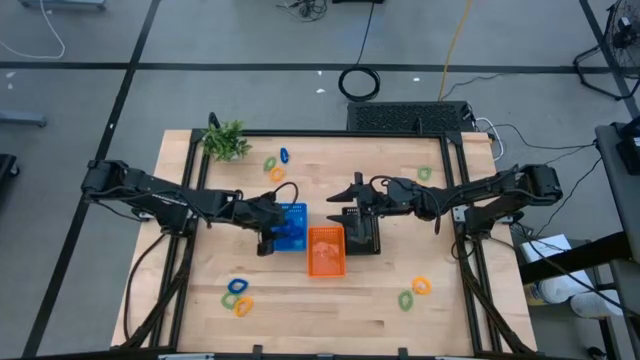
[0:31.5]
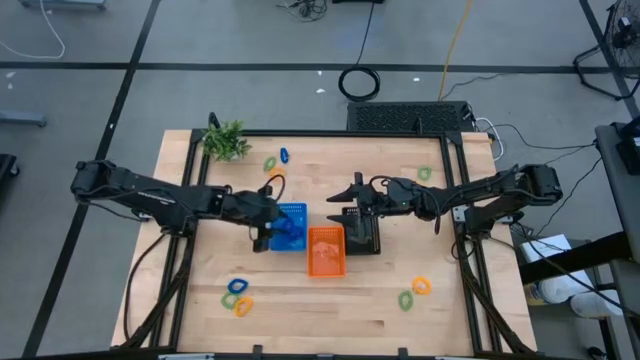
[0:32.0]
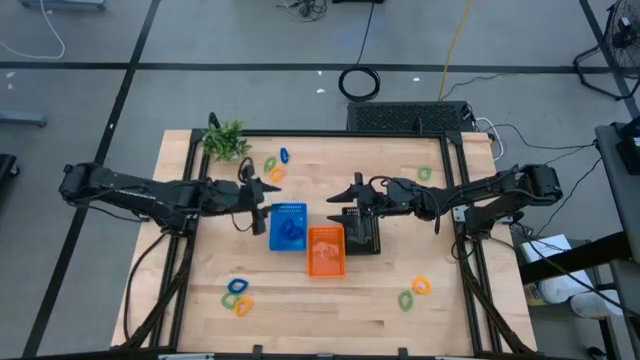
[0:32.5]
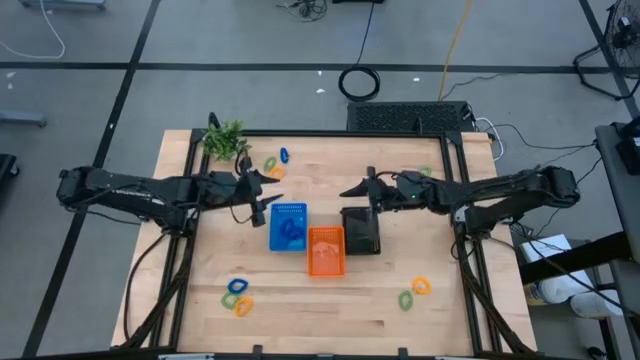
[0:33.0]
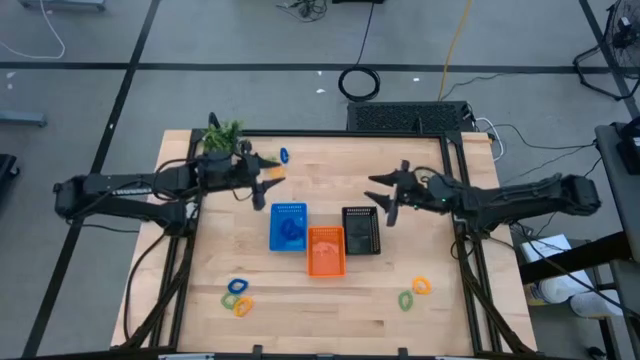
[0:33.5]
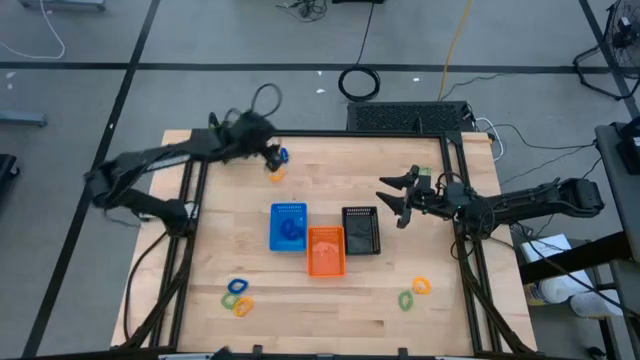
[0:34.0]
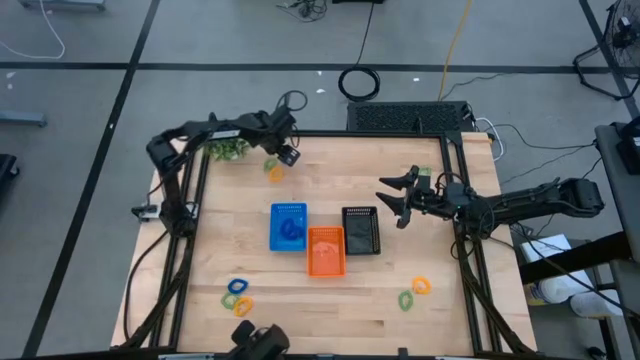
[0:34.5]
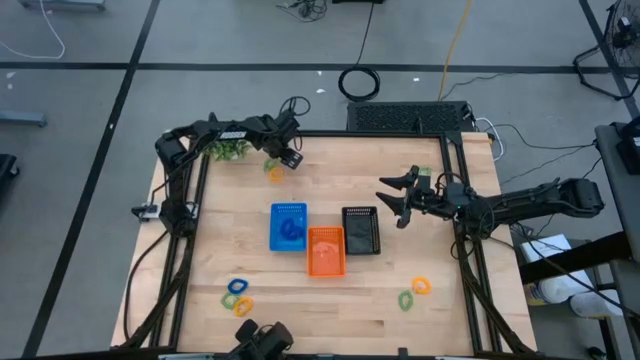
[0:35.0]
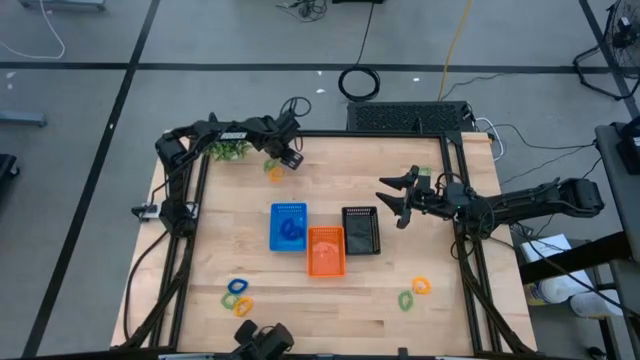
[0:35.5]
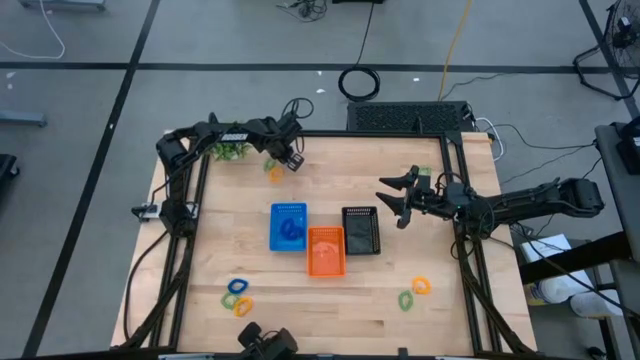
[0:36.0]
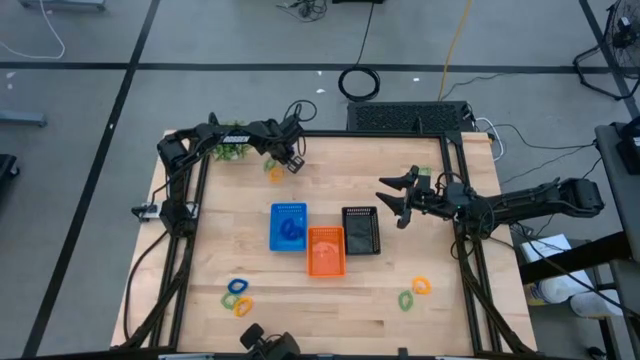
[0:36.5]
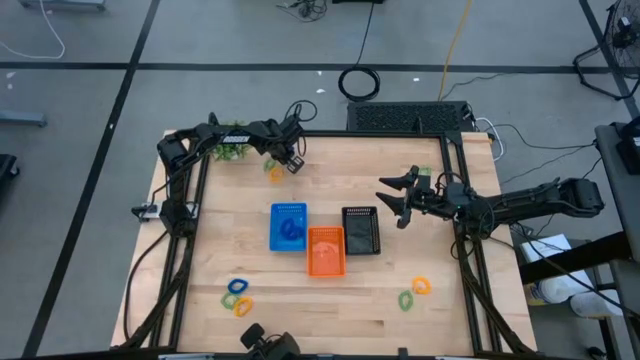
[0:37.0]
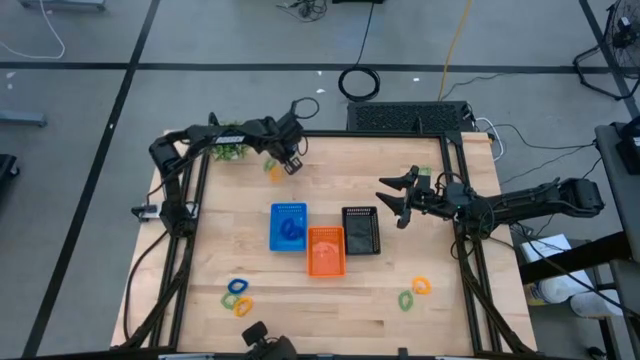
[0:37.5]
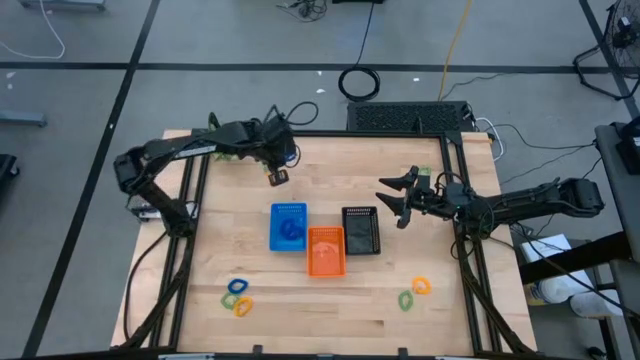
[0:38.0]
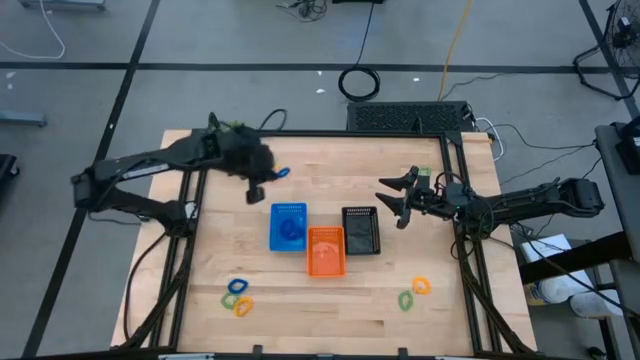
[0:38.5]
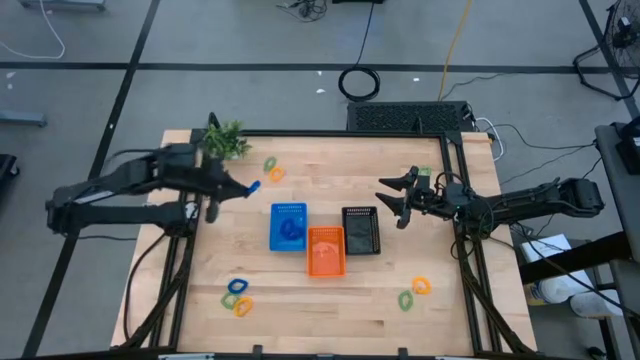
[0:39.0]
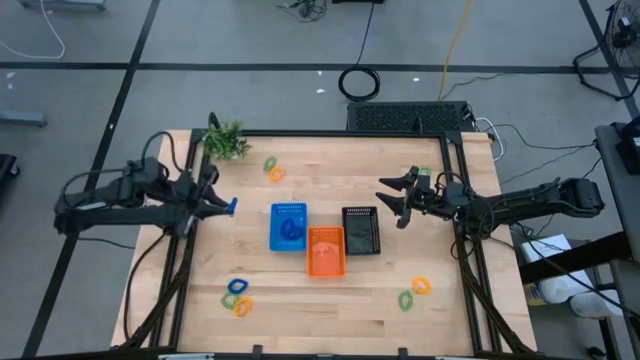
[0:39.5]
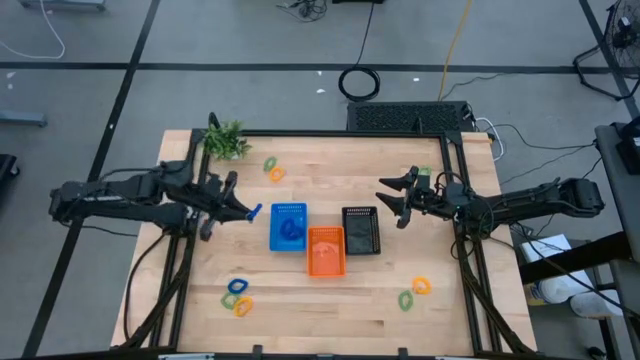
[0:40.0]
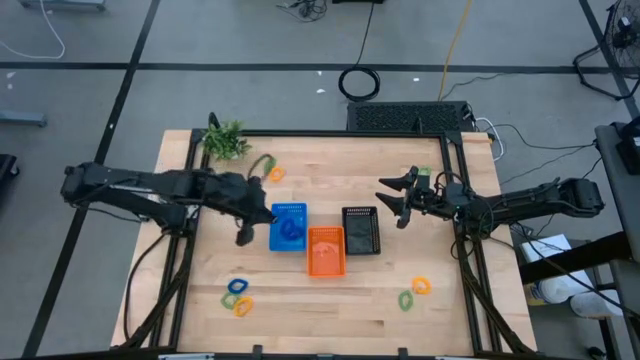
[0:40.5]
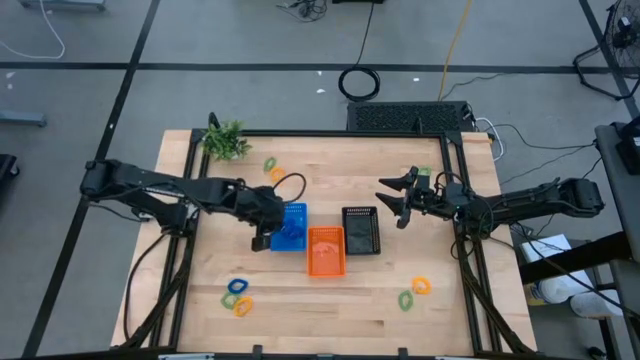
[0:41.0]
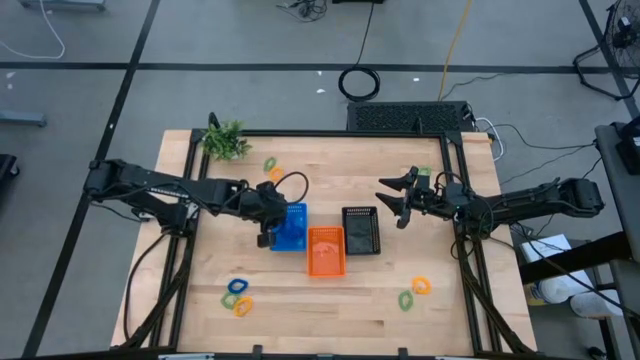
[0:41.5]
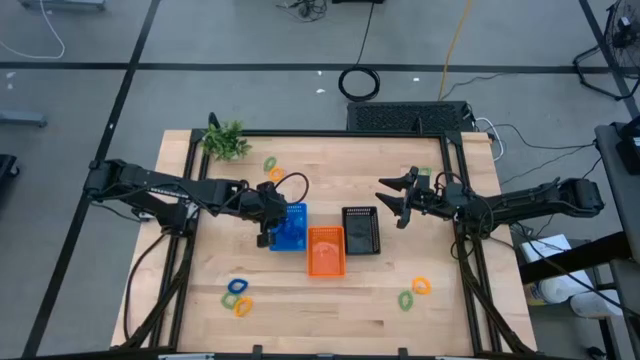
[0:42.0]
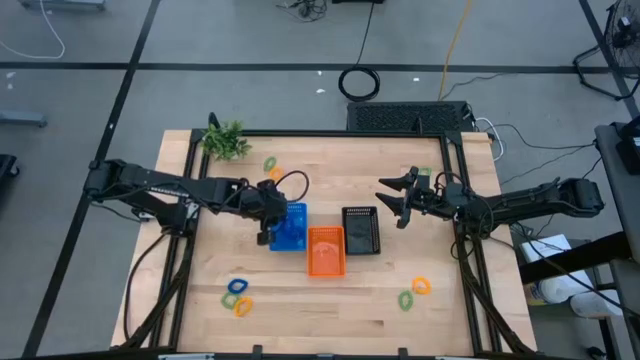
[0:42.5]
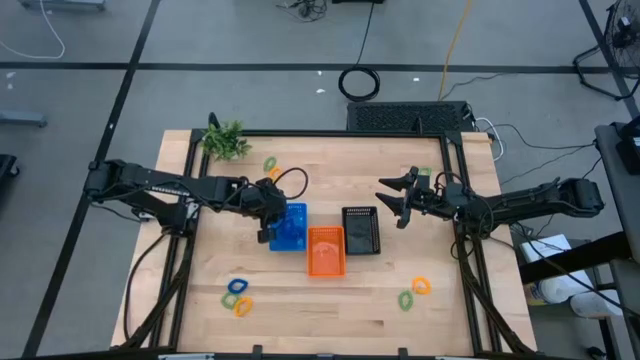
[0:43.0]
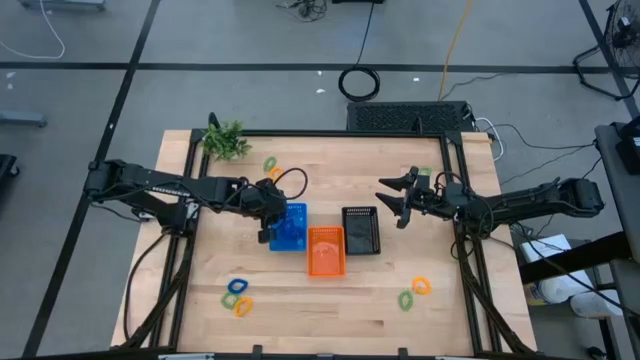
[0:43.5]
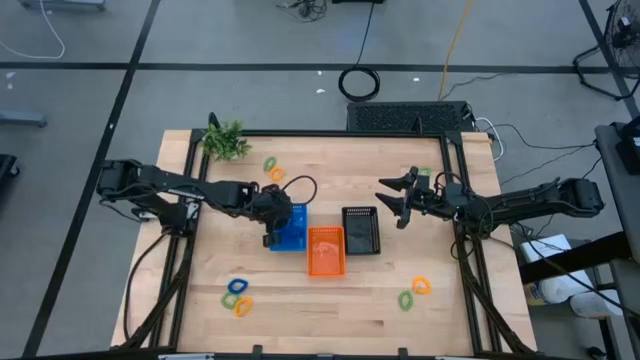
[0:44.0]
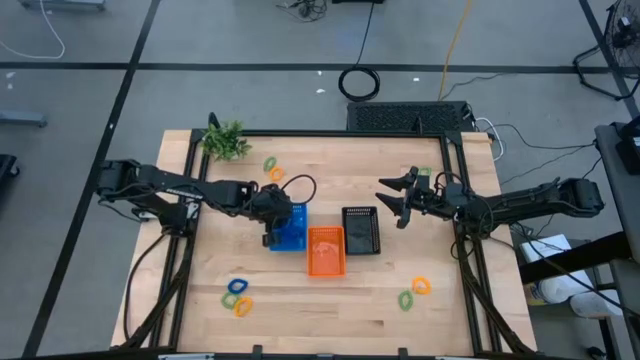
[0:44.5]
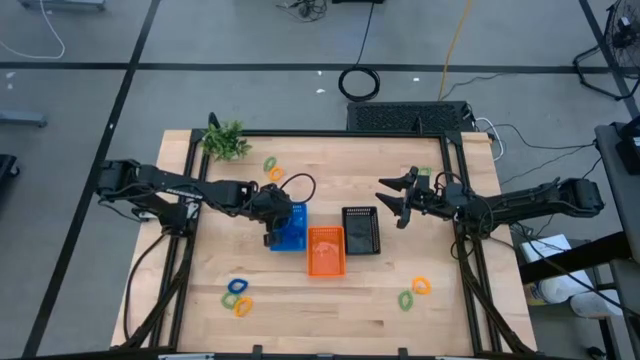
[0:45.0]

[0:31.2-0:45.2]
Task: Sort spring keychains
Put the blue spring keychain into the blue bin

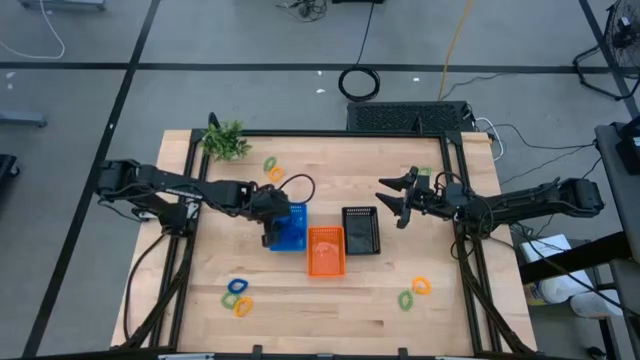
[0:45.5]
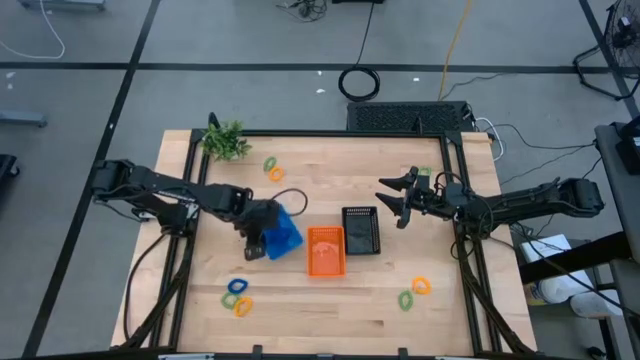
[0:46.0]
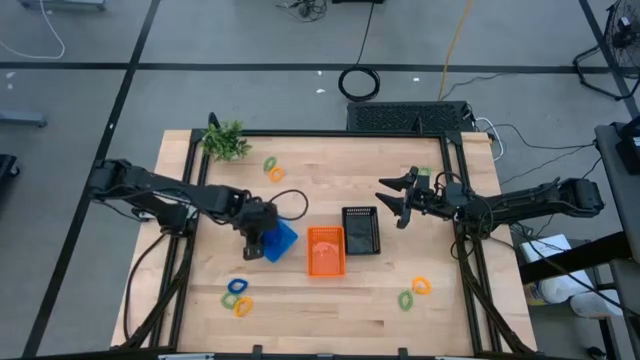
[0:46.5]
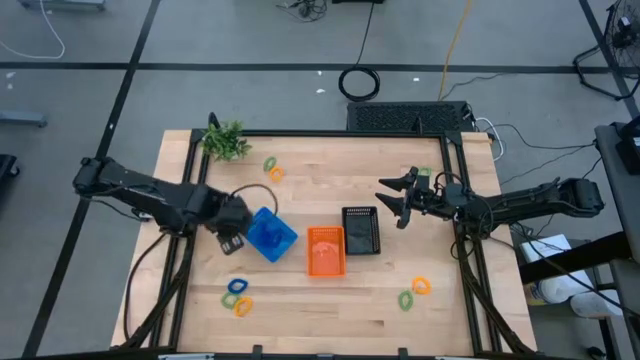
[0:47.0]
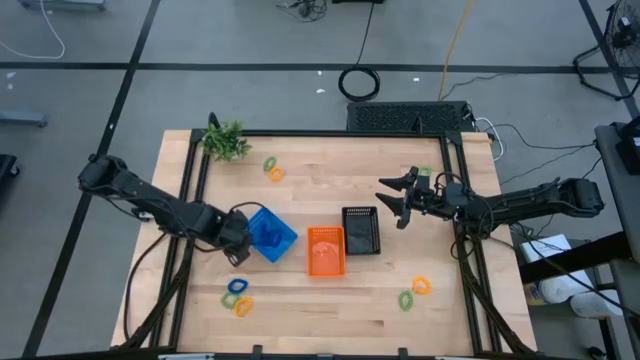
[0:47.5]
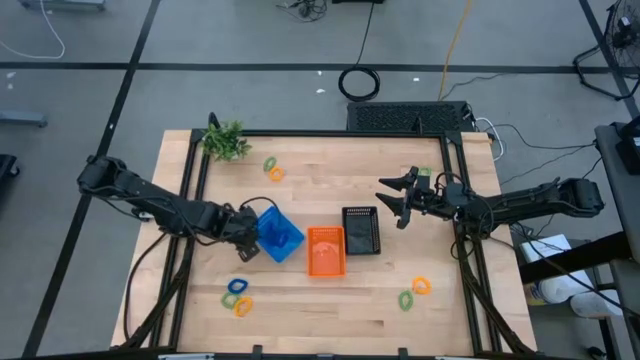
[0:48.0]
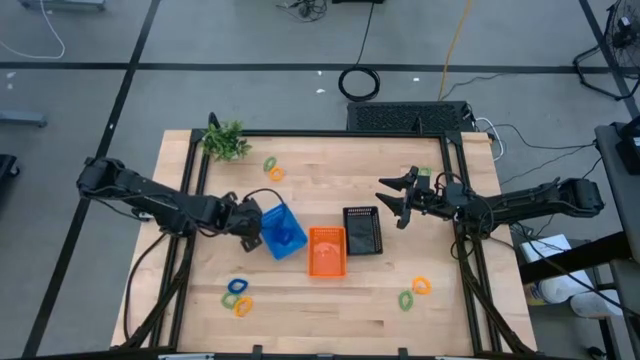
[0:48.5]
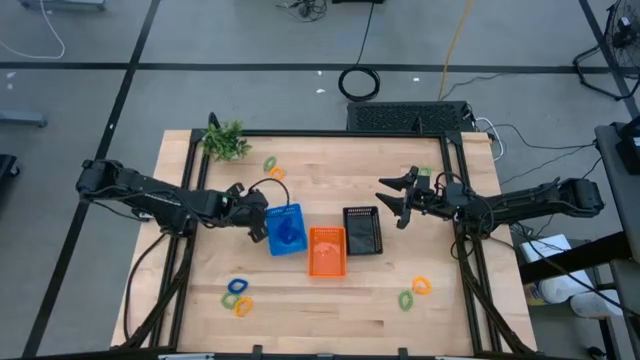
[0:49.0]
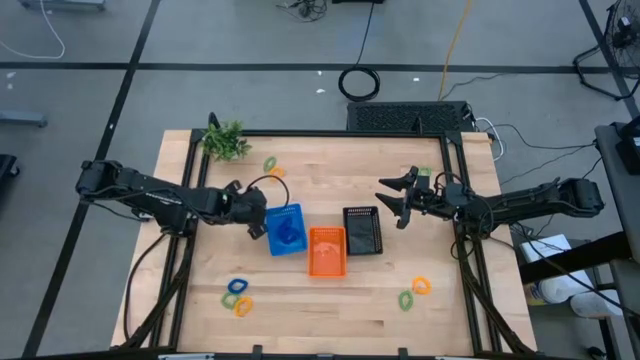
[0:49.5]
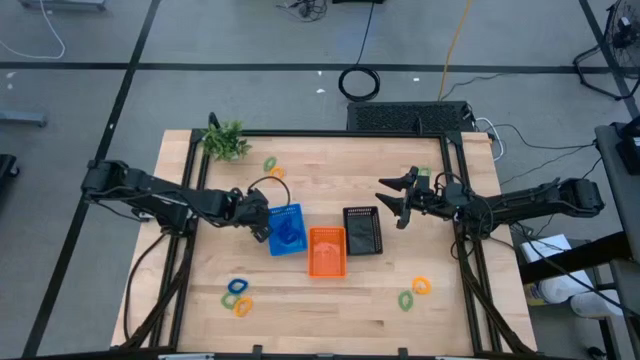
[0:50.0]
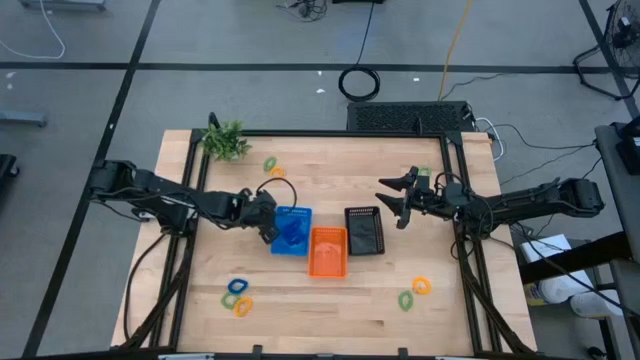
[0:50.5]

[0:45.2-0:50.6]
Adjust the blue bin
